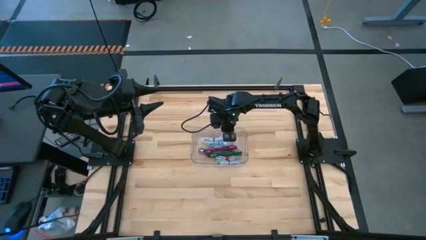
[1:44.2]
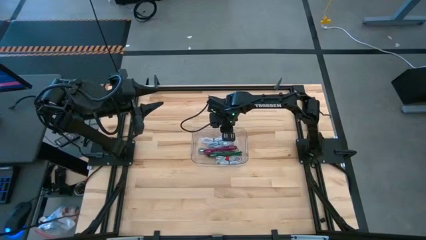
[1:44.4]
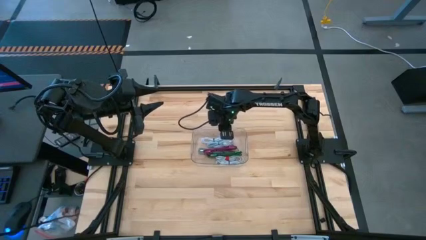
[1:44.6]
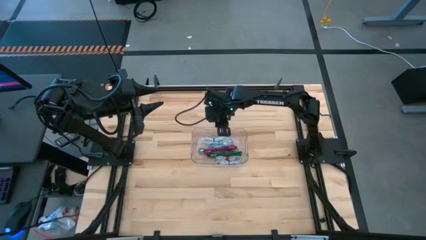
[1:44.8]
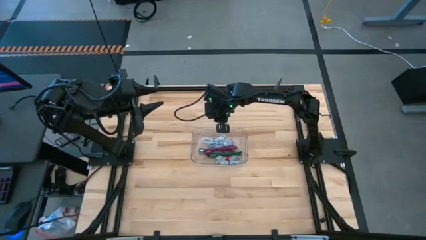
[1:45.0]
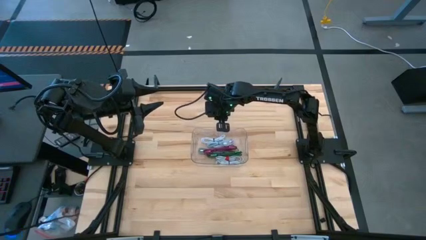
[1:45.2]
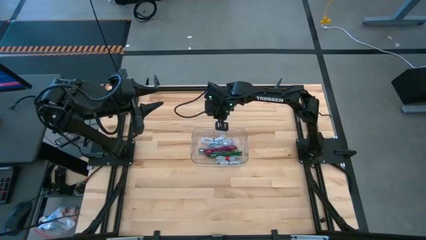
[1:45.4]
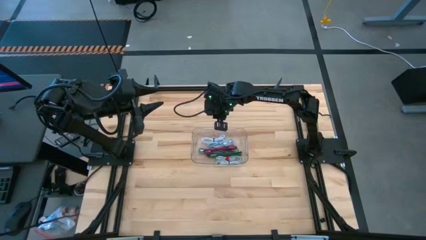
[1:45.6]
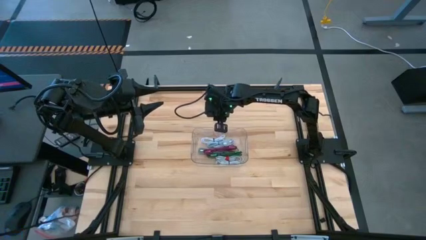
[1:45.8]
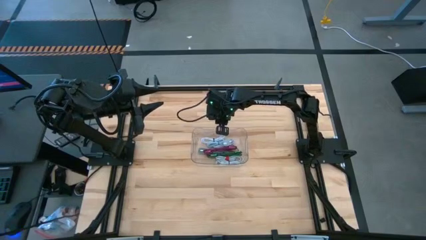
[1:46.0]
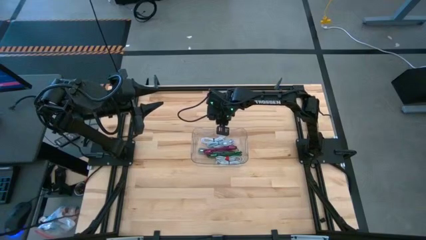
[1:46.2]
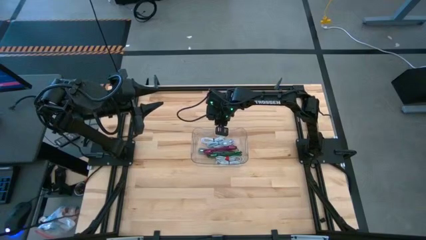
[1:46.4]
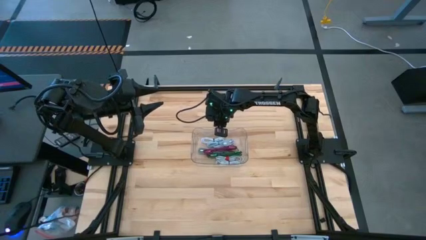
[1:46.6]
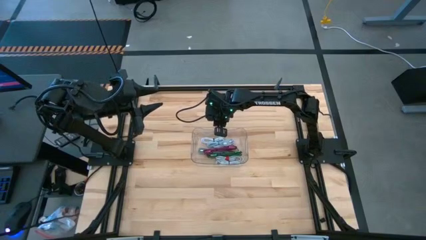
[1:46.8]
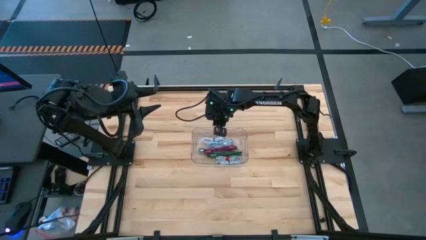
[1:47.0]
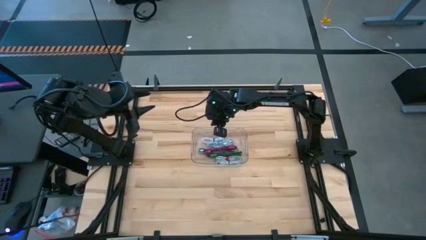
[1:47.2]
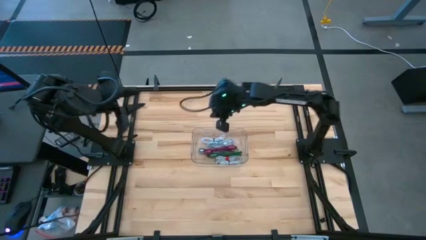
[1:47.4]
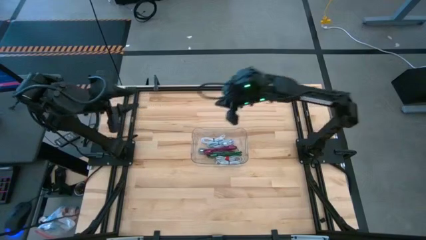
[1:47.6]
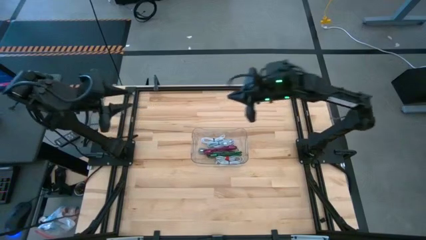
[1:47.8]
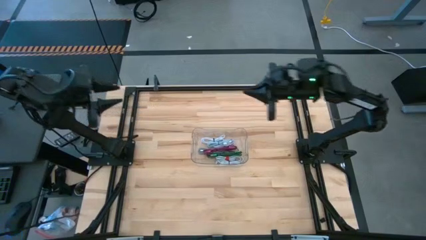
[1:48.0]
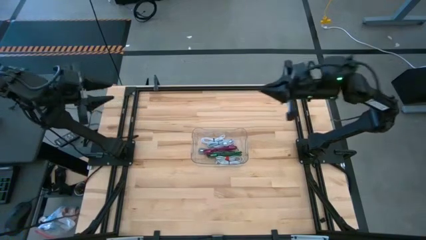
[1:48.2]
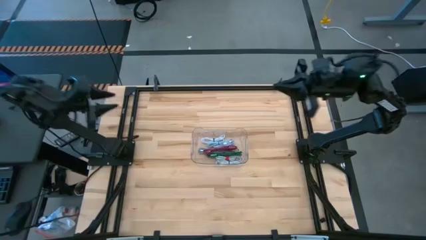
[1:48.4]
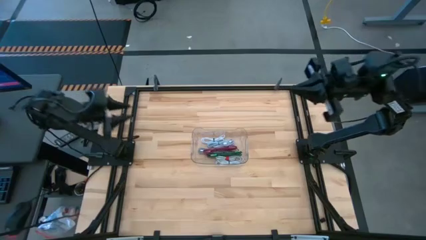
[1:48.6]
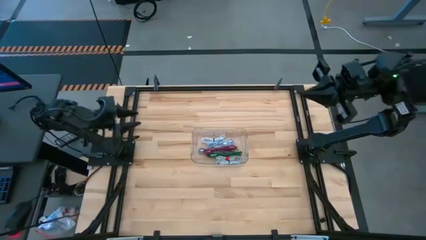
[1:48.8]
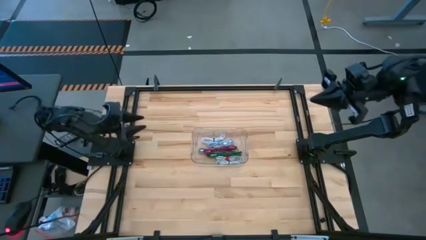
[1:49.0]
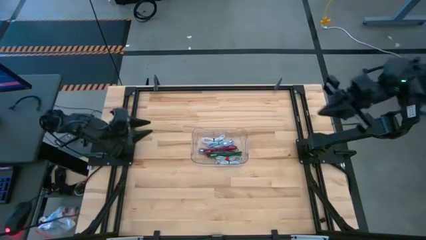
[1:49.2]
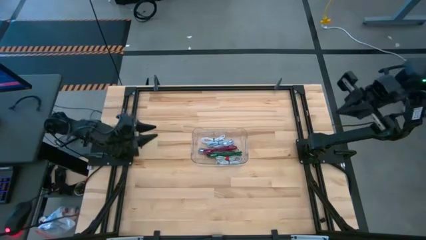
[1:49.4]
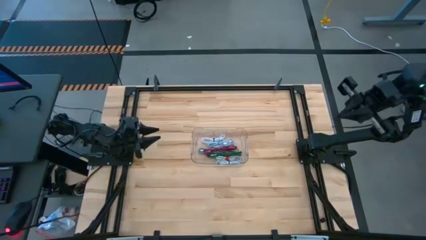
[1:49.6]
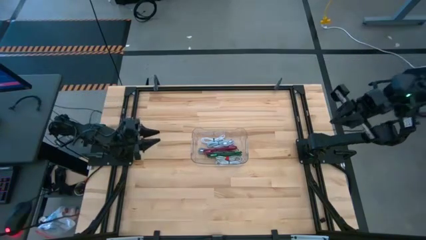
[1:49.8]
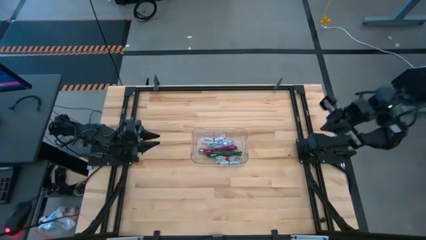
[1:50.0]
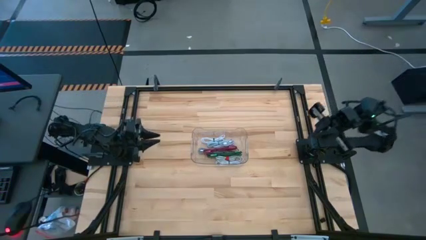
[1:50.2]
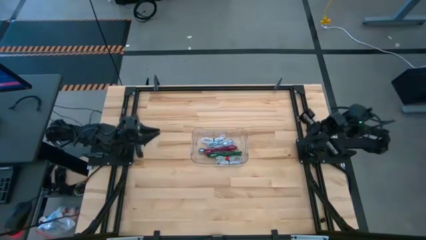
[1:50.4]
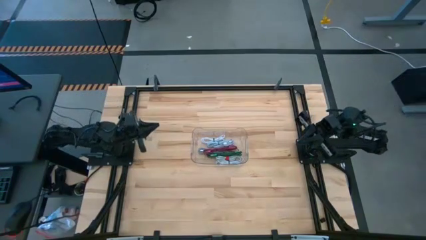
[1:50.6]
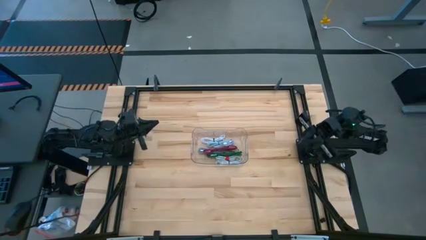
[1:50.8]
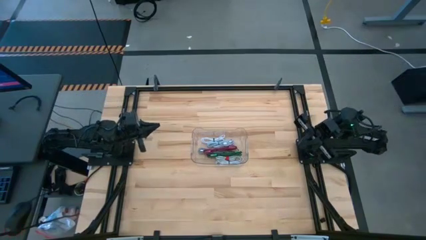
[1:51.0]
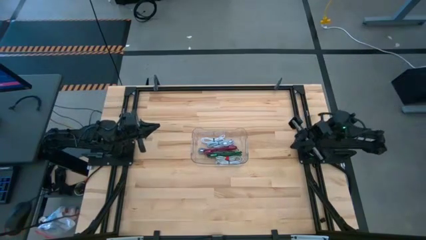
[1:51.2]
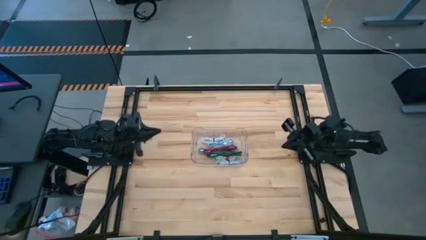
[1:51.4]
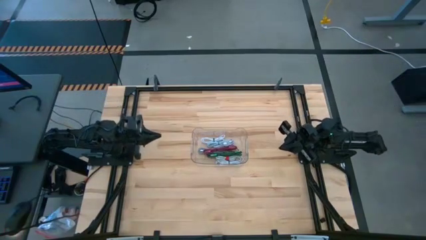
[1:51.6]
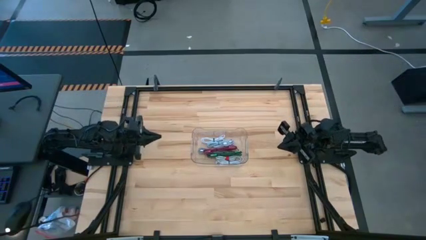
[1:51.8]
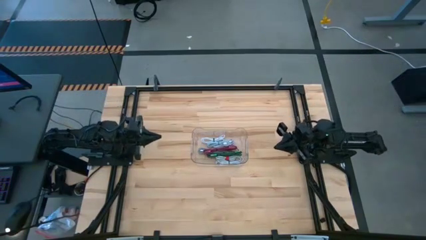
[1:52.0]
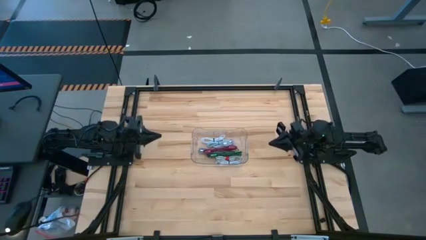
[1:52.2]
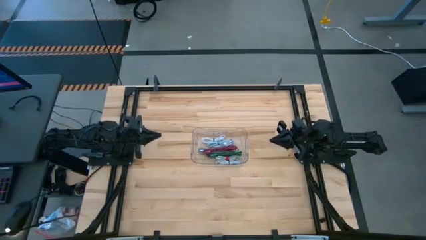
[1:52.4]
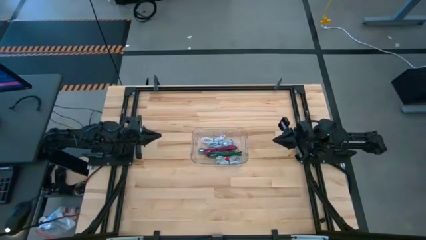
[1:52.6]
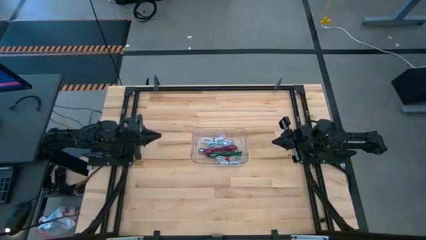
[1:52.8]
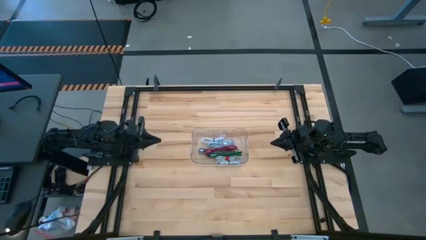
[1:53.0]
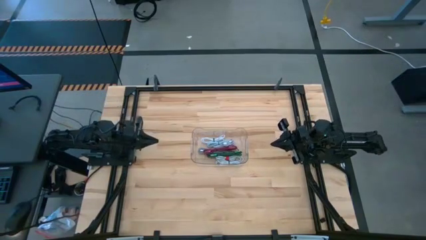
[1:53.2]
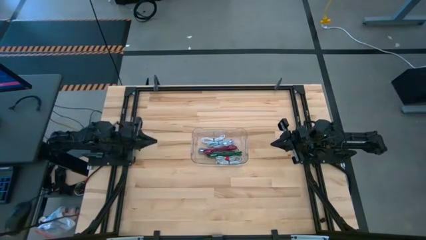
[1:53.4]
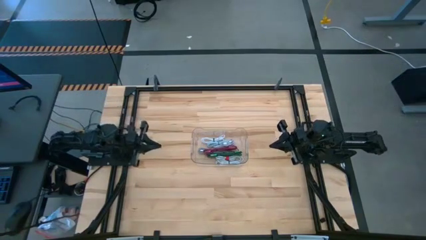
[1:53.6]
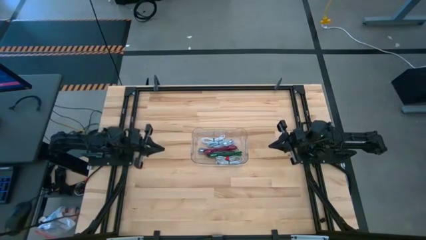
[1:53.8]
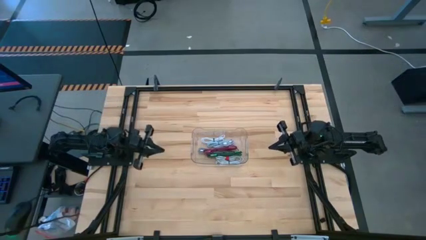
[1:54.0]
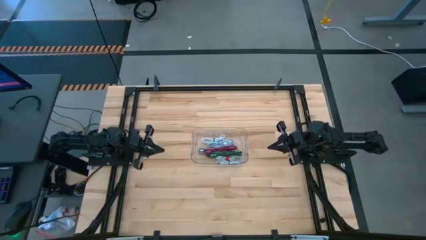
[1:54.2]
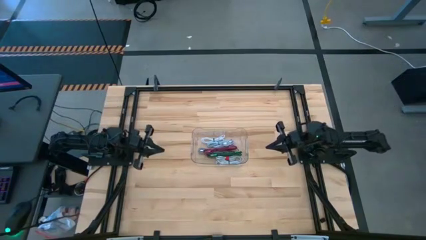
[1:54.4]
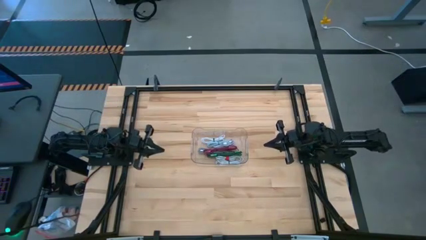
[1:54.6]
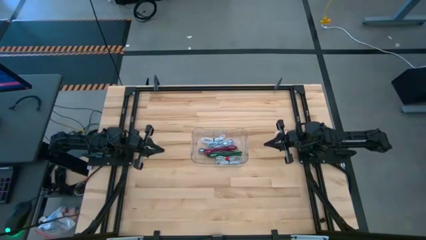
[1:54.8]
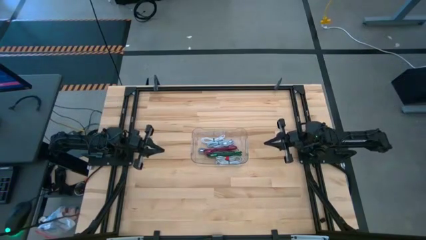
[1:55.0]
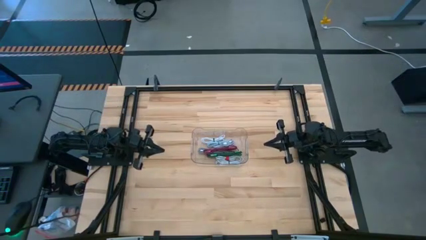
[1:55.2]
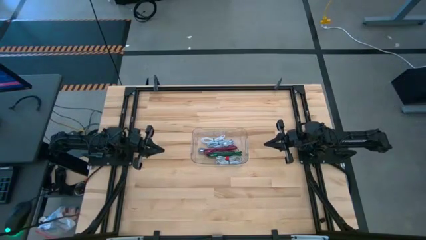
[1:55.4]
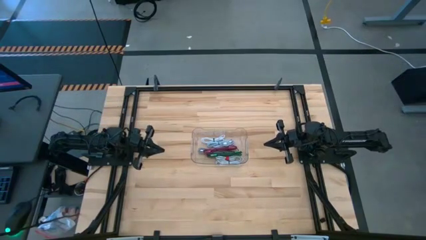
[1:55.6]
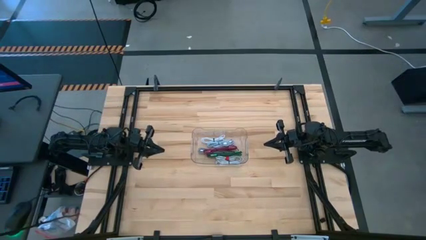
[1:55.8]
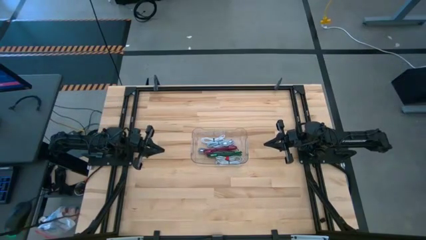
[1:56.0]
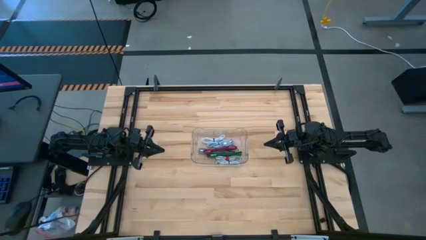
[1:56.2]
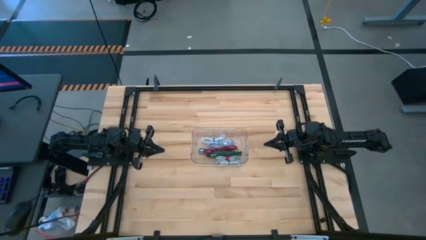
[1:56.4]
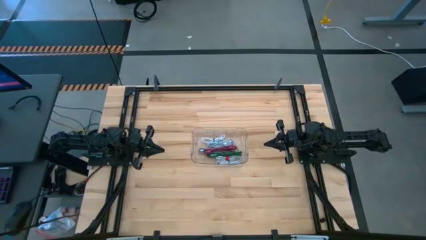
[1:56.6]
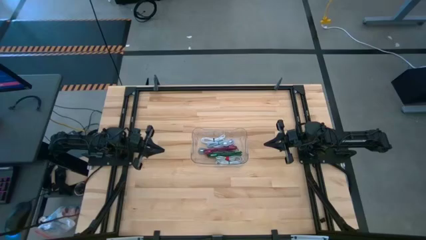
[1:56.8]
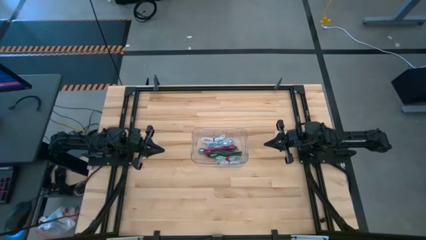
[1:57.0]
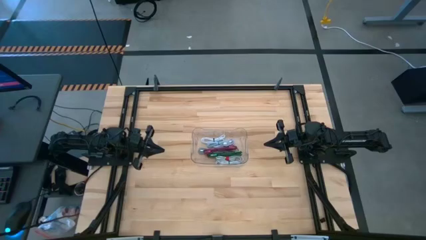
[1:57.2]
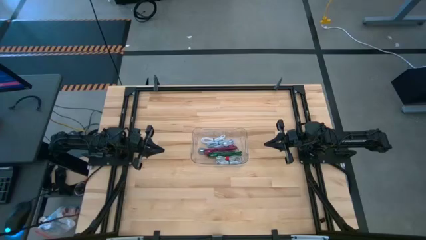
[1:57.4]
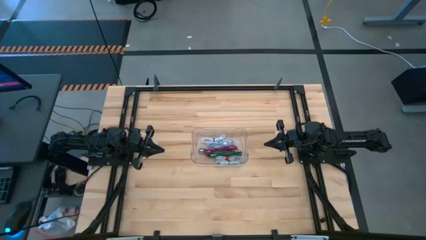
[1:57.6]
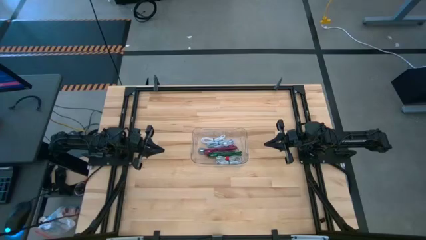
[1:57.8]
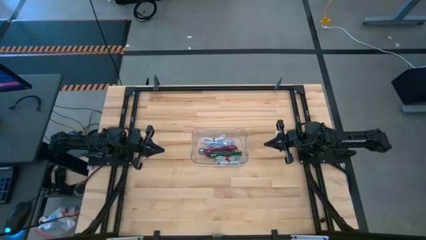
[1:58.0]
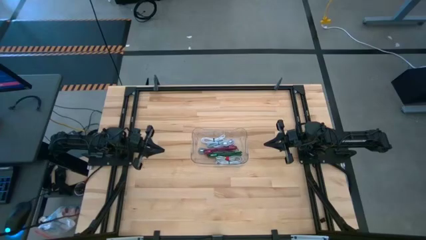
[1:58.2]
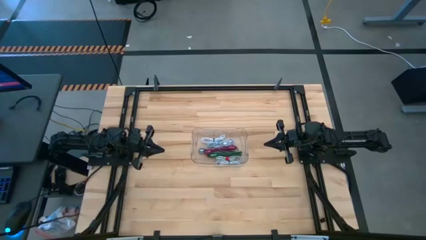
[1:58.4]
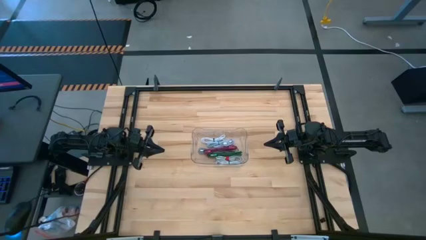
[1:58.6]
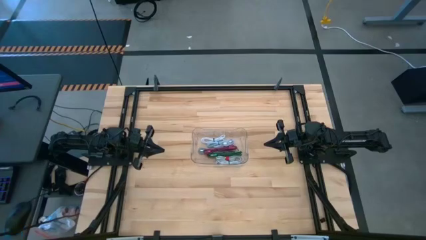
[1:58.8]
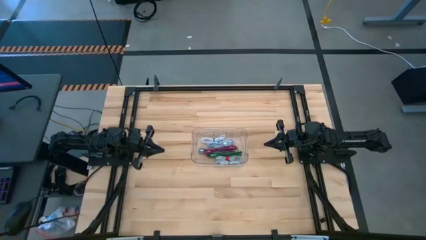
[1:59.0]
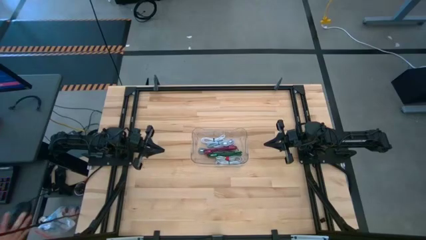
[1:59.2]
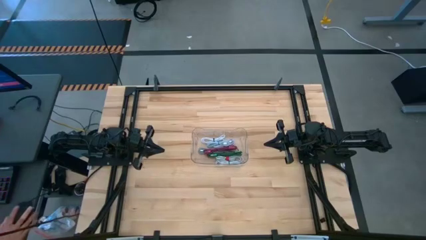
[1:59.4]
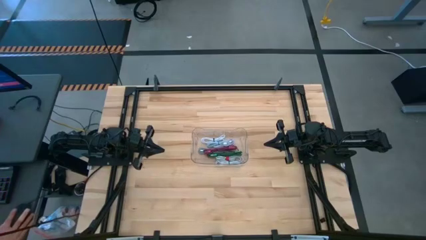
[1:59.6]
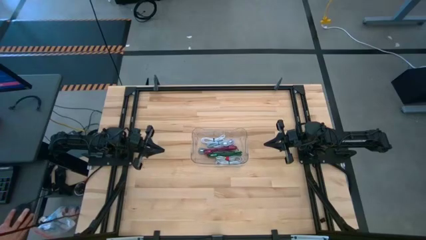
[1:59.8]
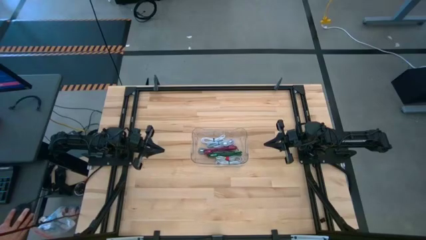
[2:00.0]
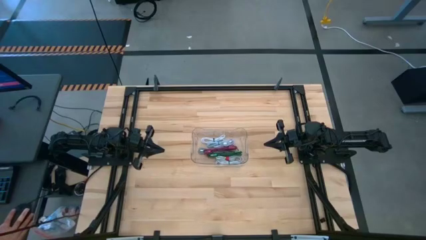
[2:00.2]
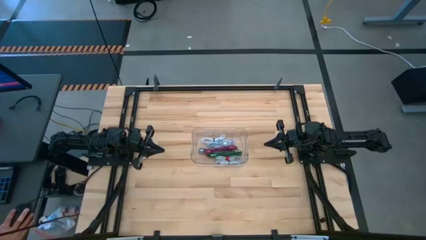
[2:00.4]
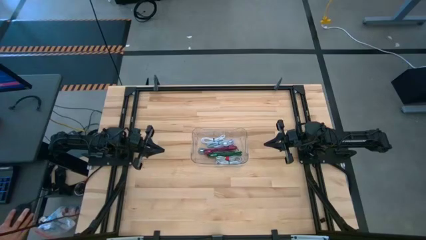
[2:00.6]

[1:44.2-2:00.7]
Task: Pick and place USB-C Cables
Return to home position
